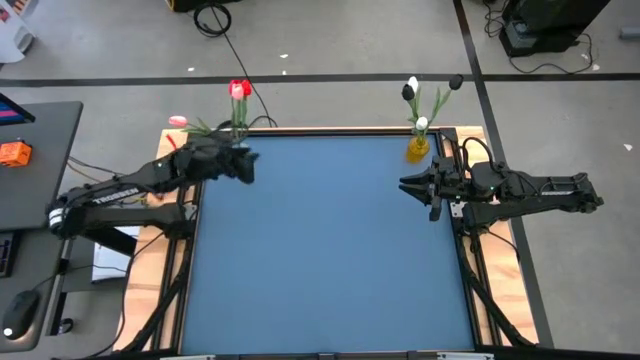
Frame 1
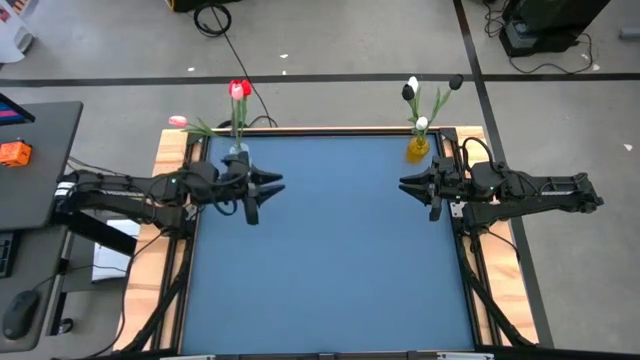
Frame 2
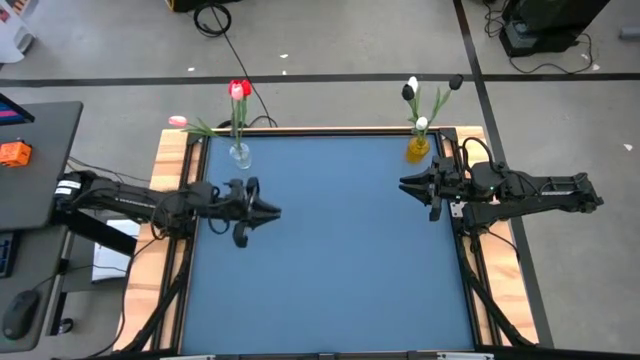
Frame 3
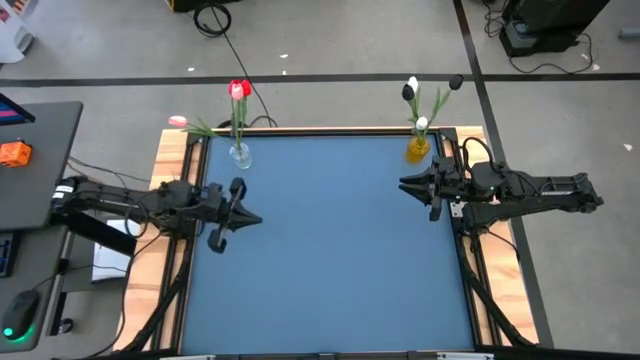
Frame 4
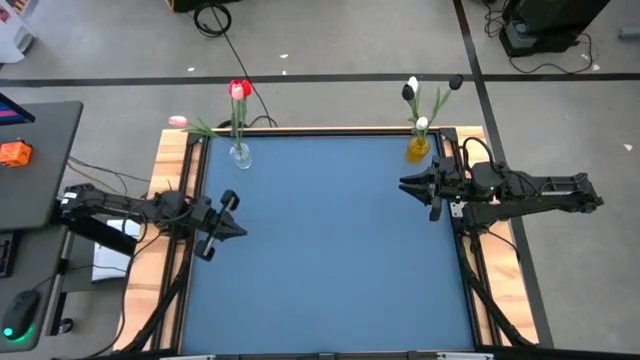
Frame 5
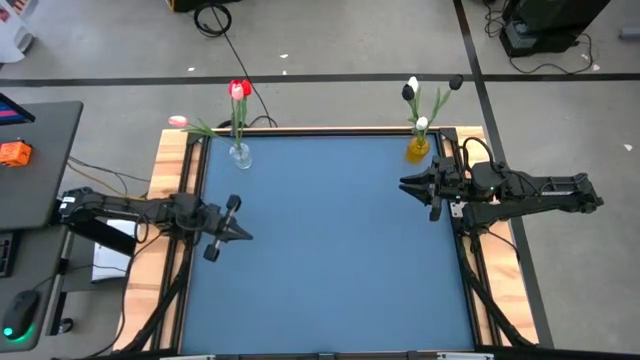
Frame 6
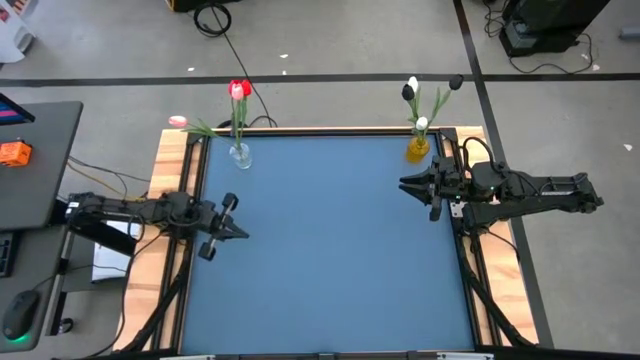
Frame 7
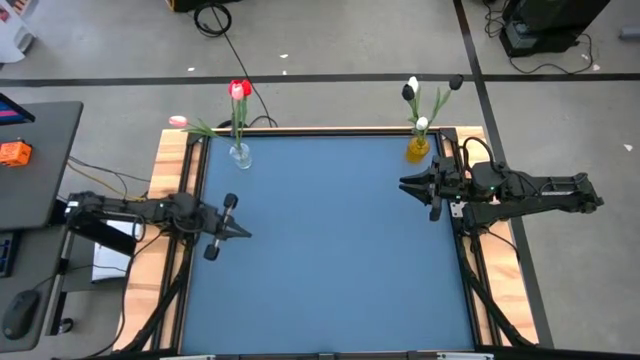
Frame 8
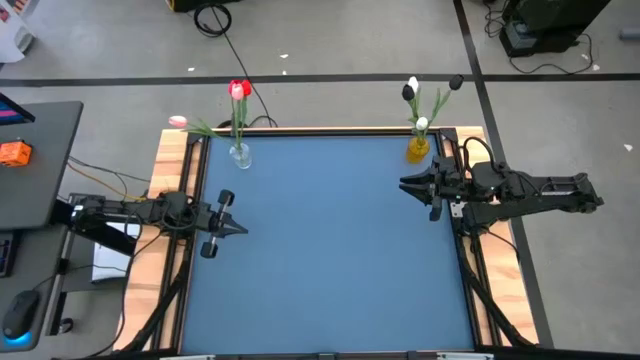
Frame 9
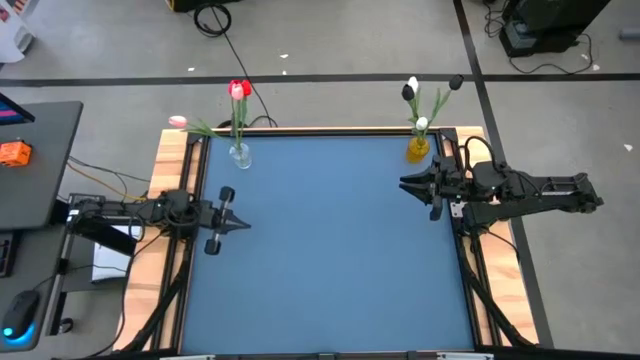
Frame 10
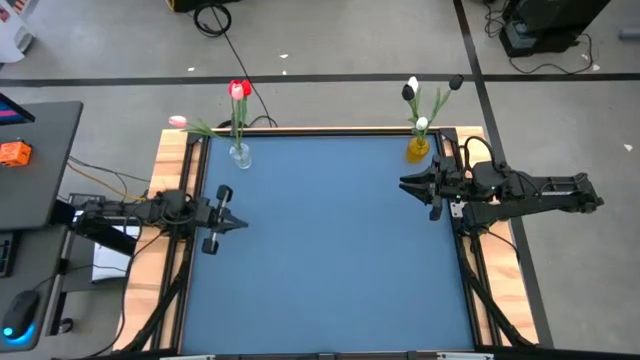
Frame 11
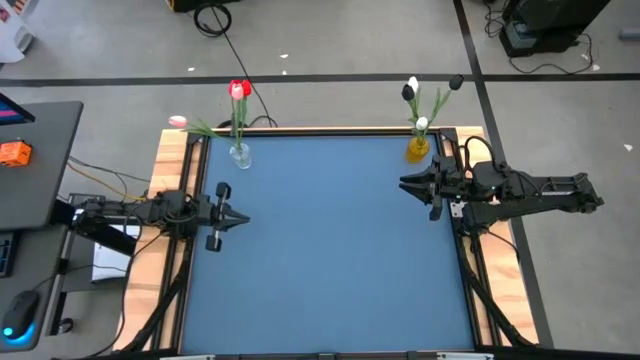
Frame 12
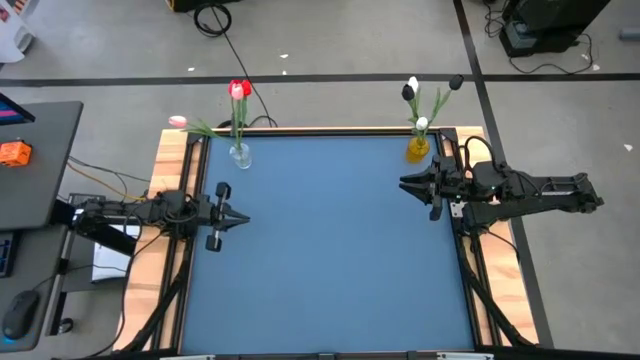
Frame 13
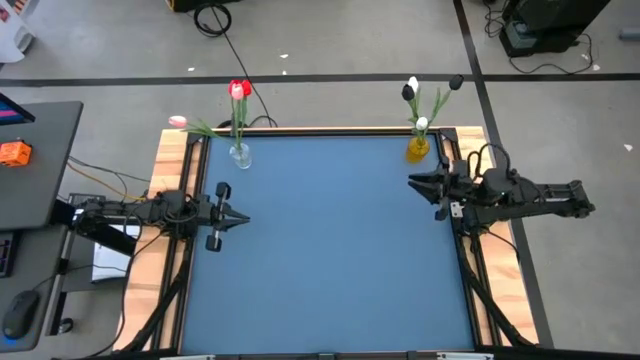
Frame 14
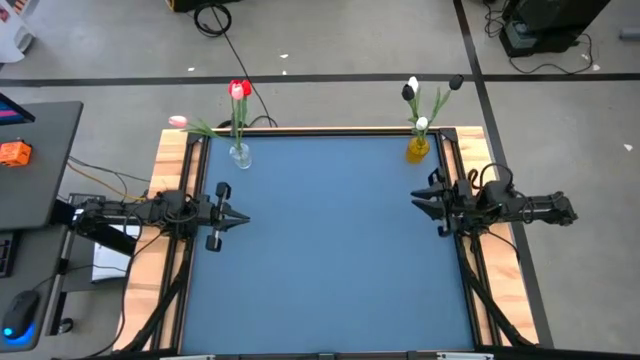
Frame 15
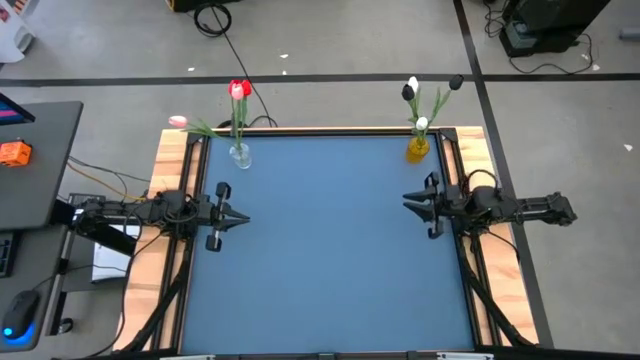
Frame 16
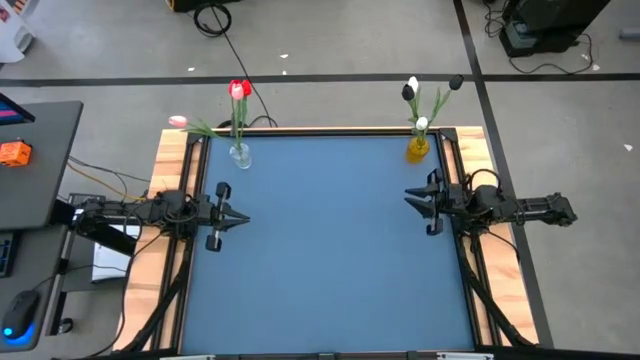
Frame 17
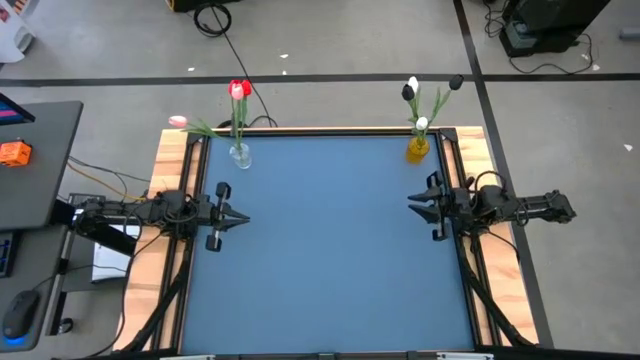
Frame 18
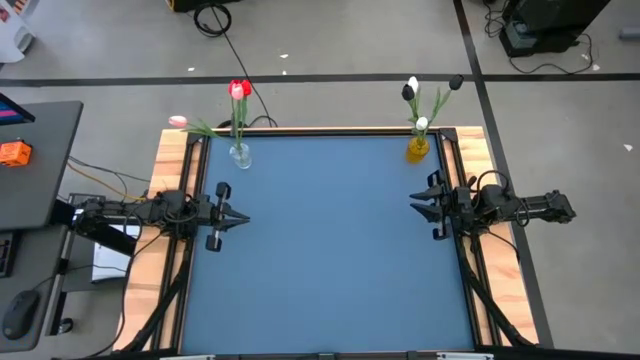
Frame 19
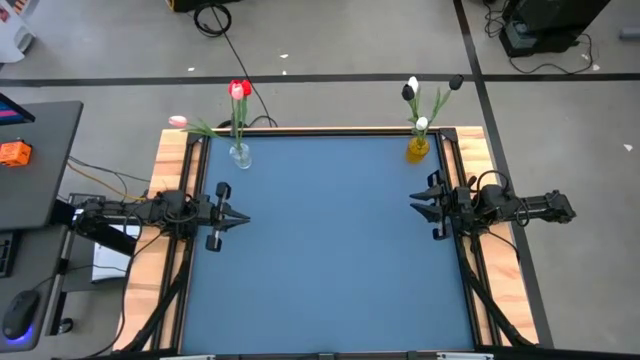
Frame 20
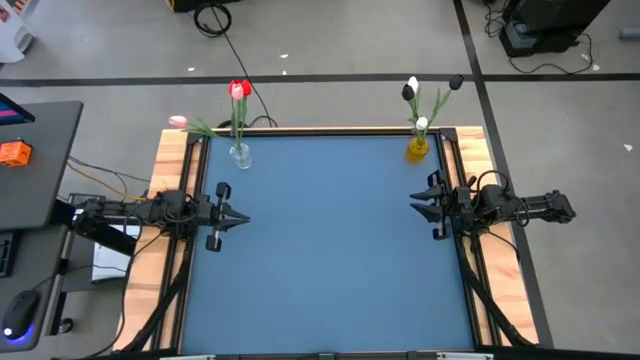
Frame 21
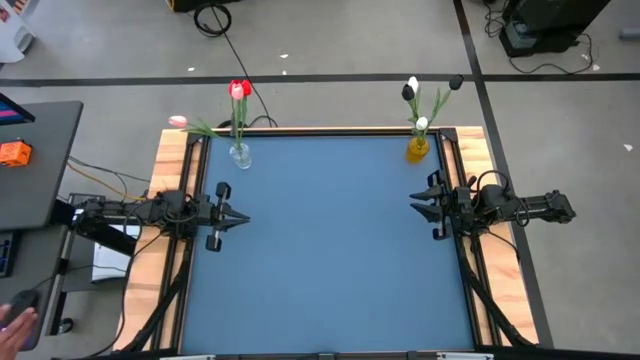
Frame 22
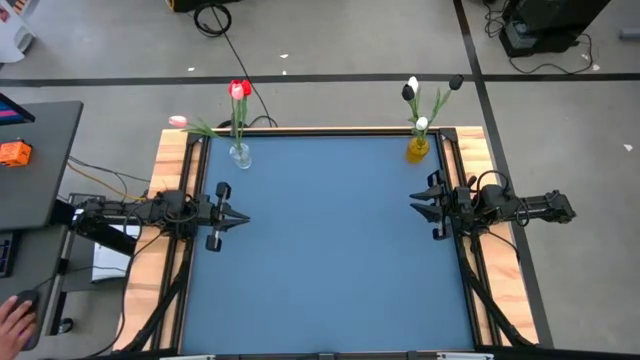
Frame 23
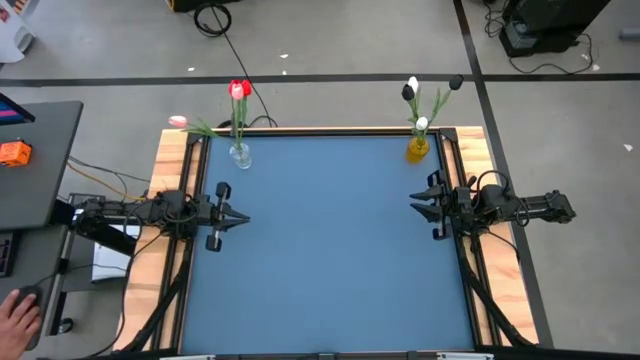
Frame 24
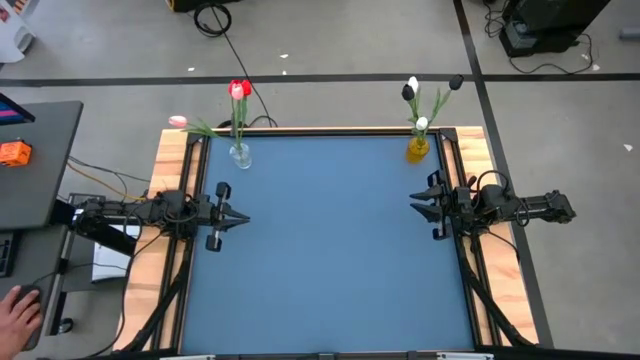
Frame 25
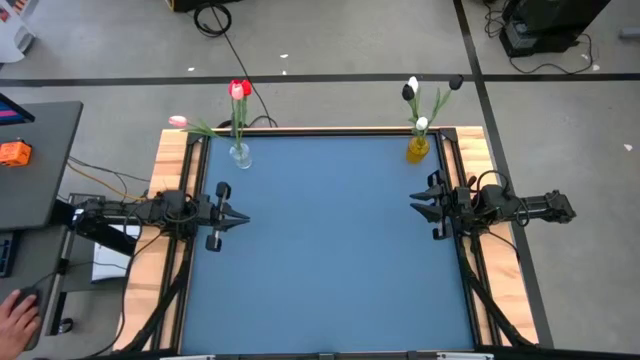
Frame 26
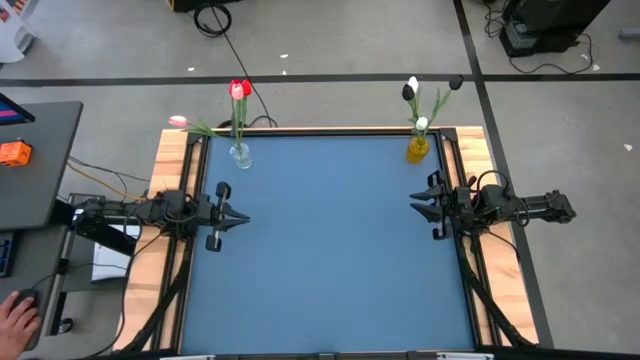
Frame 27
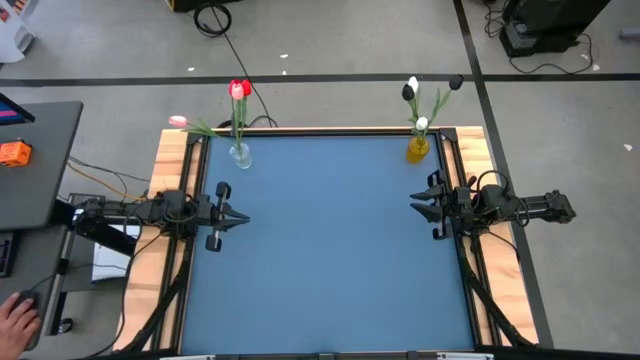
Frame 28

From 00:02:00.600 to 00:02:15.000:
Task: Sort flowers into vase by color
Return to Home Position

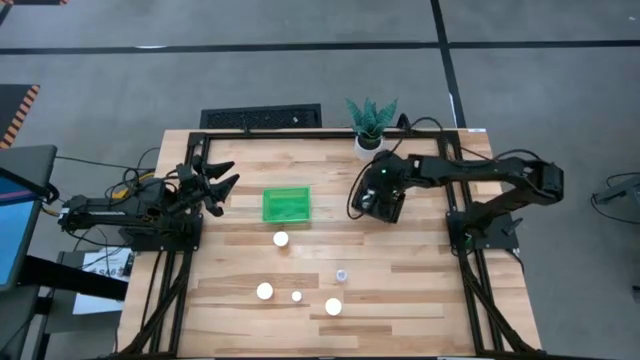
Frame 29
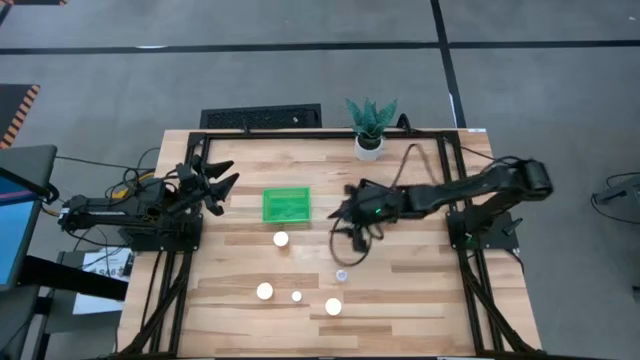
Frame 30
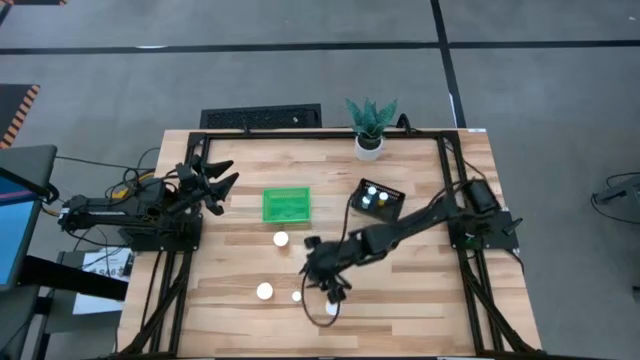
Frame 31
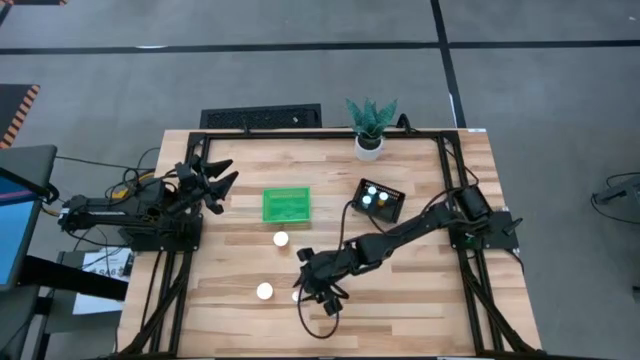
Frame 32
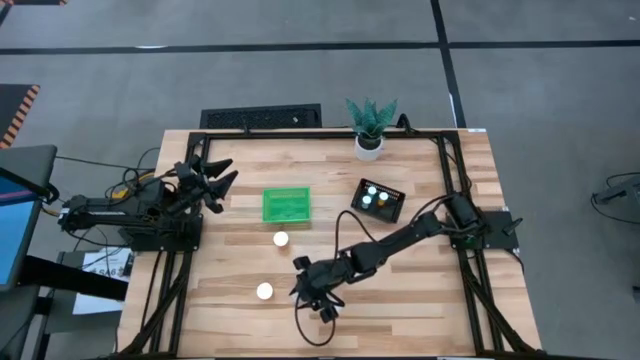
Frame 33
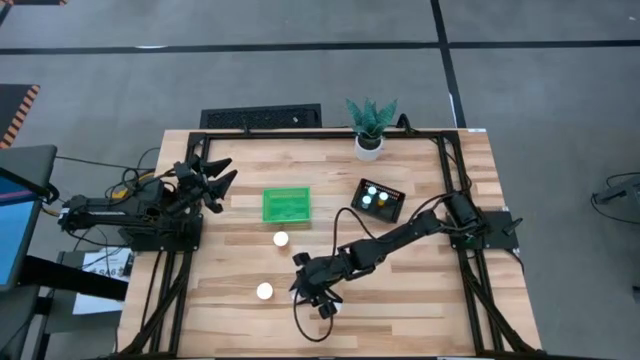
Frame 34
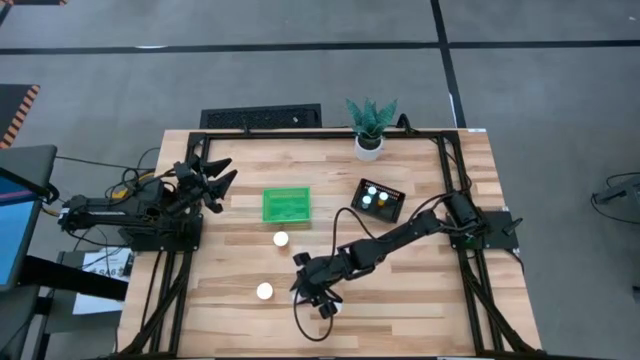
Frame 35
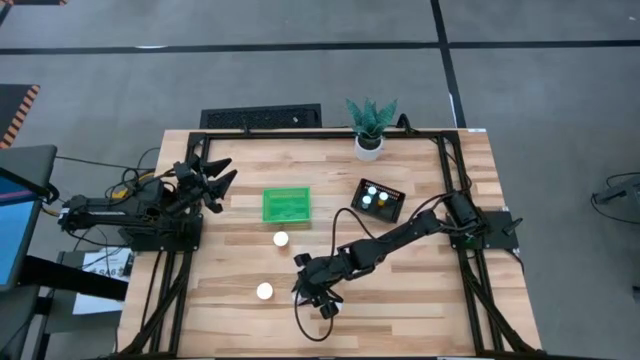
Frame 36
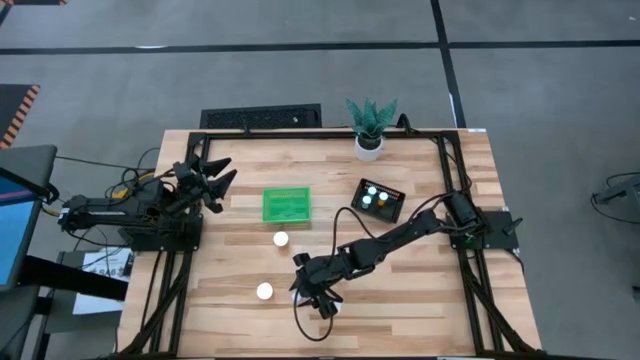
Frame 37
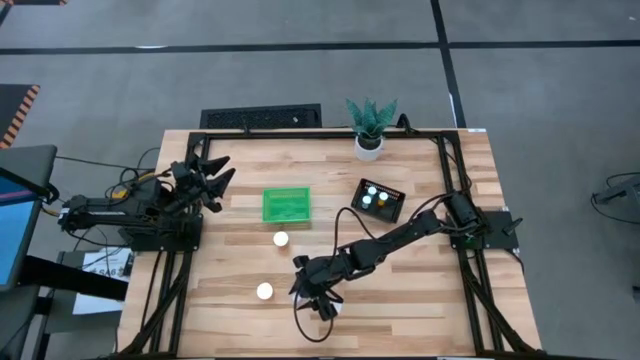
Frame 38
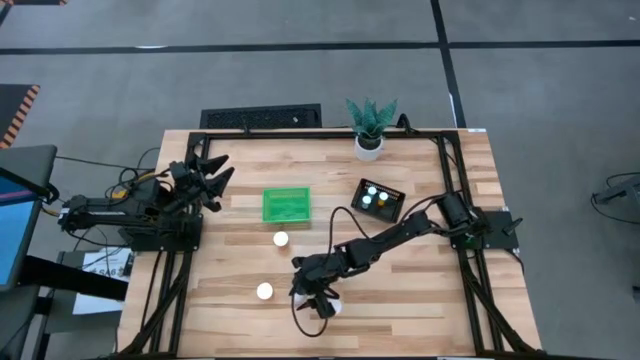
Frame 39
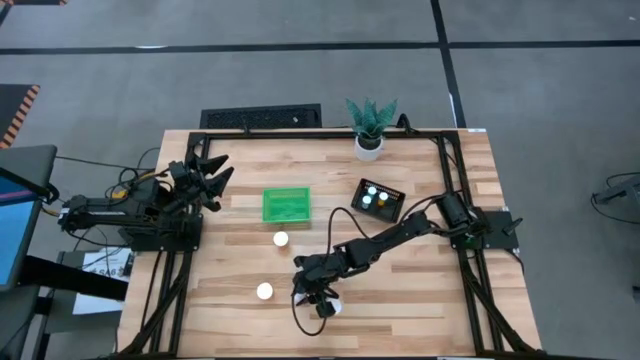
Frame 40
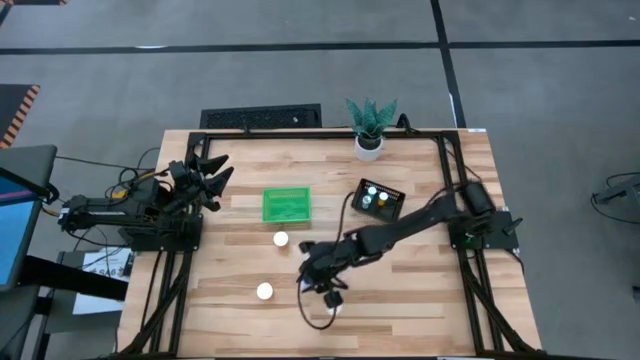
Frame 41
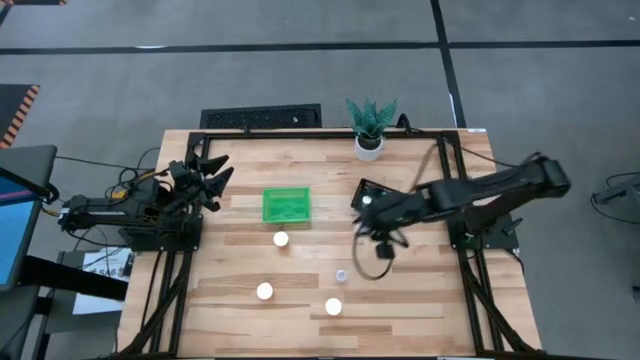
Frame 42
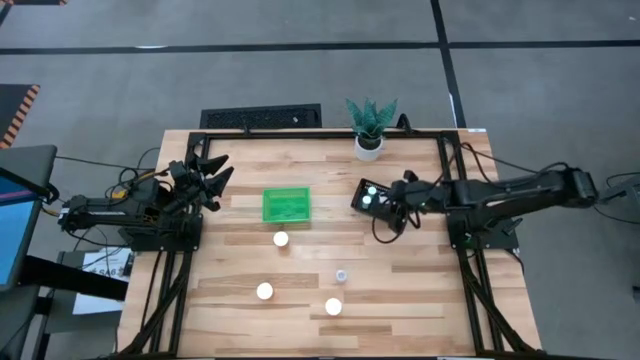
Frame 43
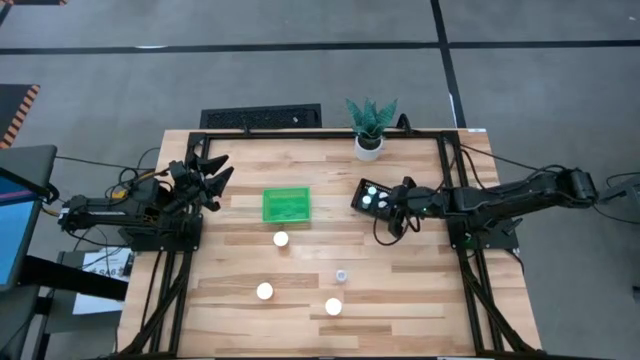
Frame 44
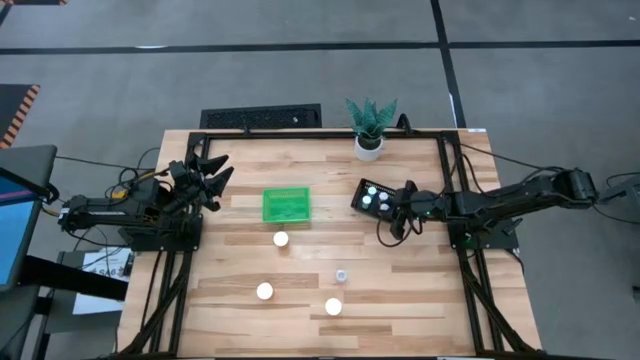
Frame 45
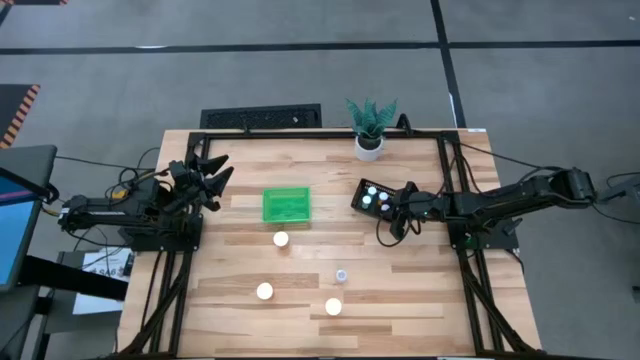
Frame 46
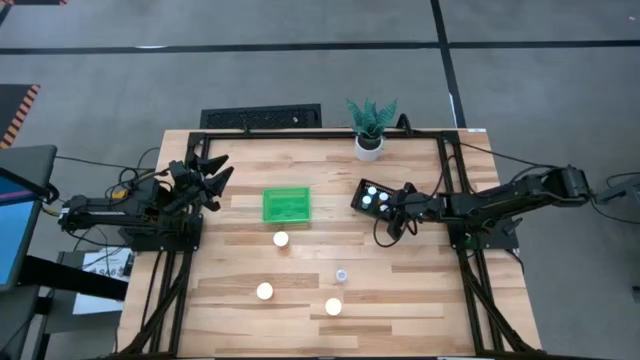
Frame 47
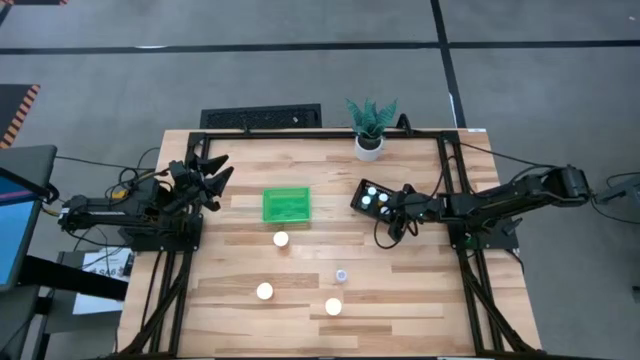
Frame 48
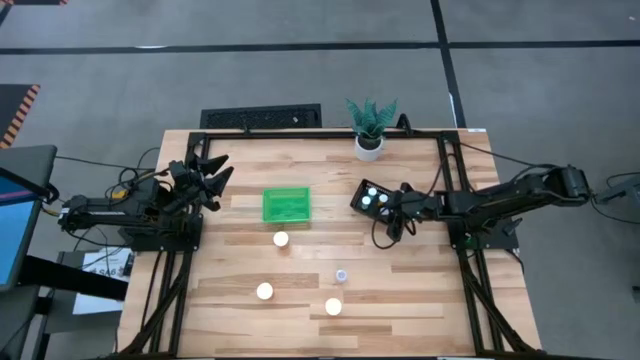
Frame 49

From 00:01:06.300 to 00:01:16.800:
Task: Pick and place medicine bottles into bin by pill shape (circle, oval)
Put the pink tablet bottle into the black basket
